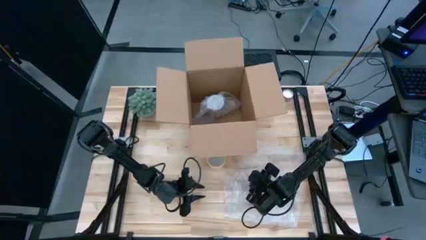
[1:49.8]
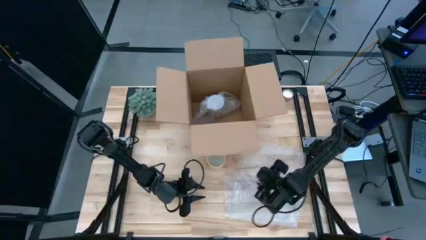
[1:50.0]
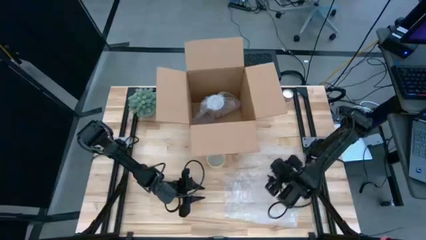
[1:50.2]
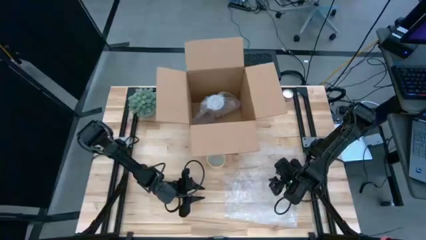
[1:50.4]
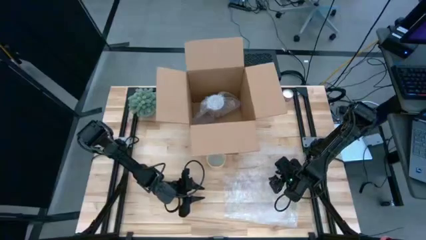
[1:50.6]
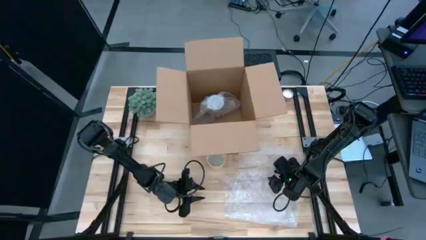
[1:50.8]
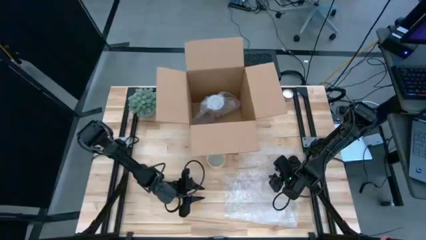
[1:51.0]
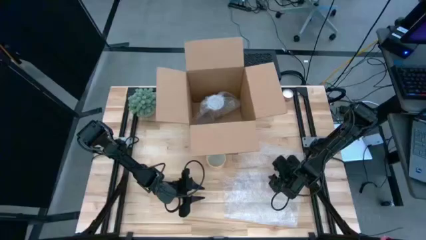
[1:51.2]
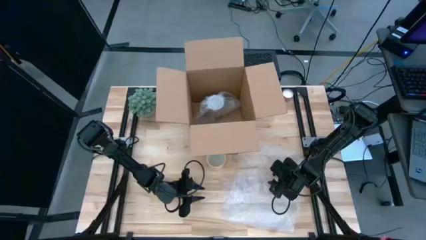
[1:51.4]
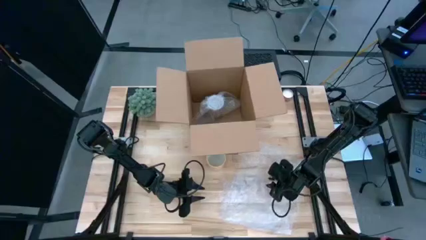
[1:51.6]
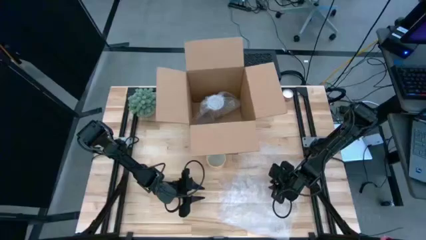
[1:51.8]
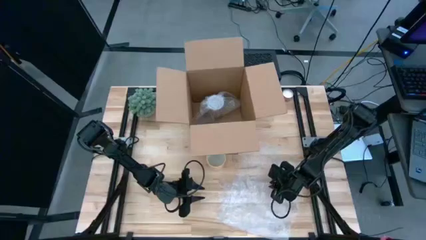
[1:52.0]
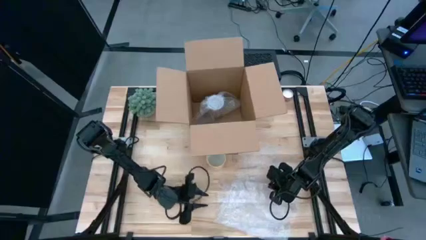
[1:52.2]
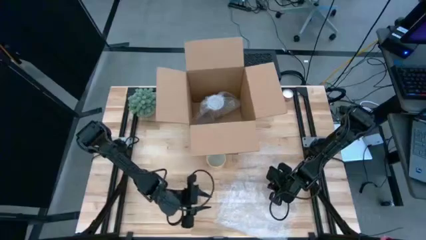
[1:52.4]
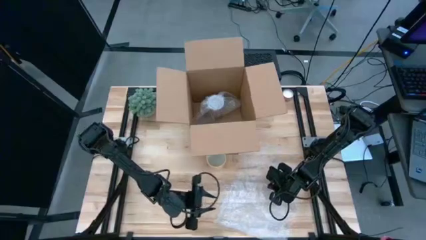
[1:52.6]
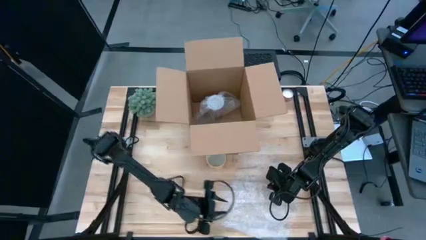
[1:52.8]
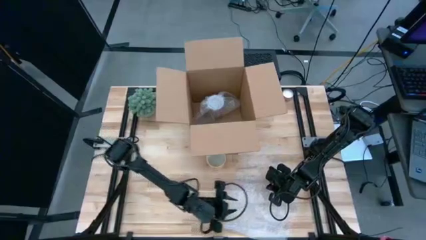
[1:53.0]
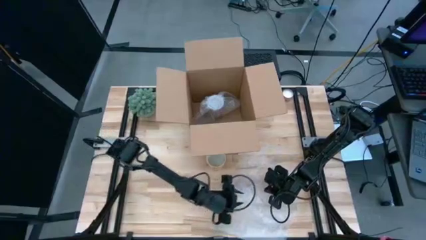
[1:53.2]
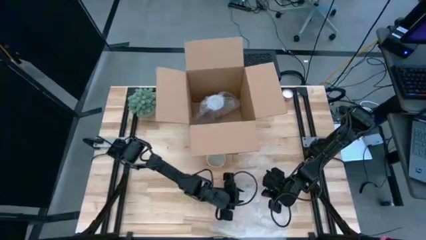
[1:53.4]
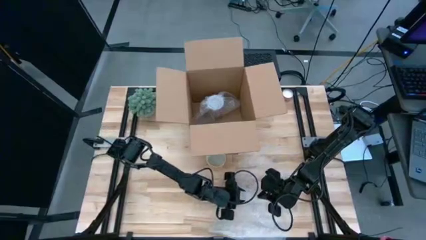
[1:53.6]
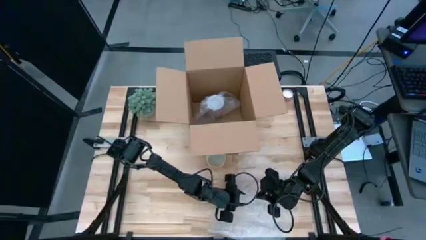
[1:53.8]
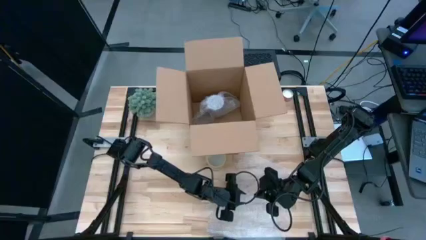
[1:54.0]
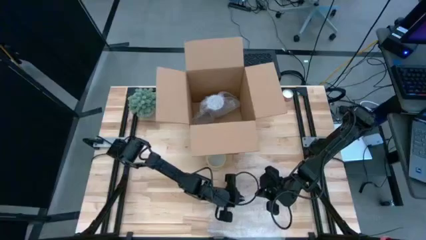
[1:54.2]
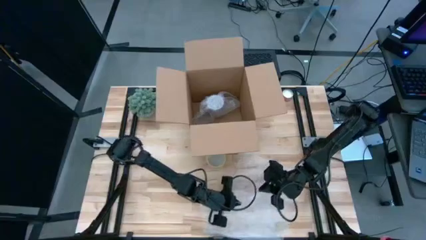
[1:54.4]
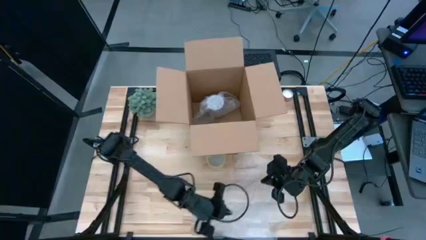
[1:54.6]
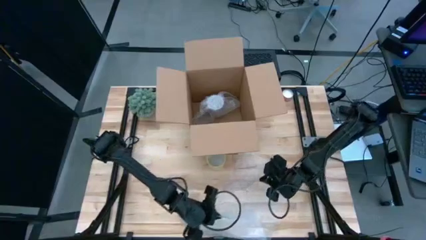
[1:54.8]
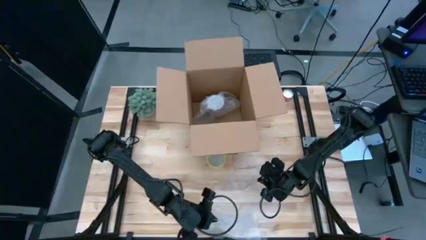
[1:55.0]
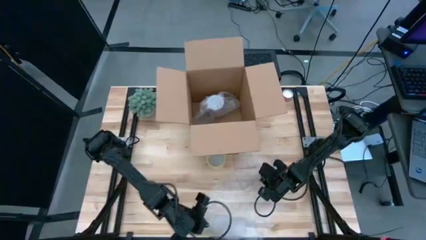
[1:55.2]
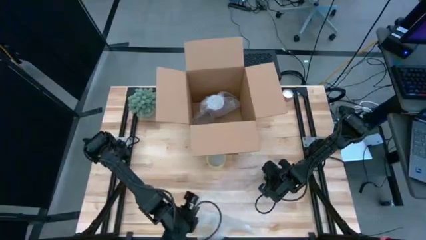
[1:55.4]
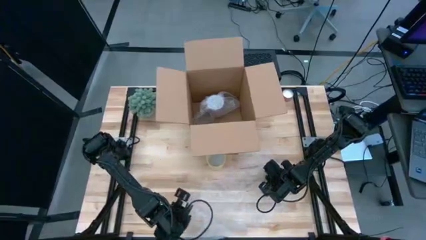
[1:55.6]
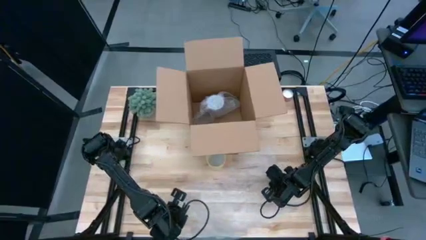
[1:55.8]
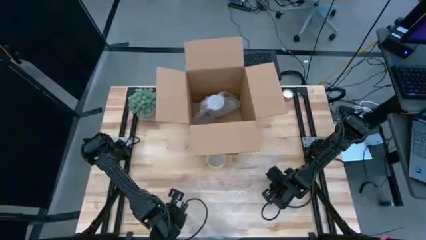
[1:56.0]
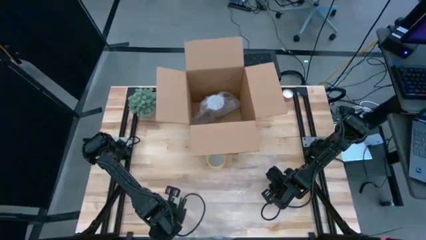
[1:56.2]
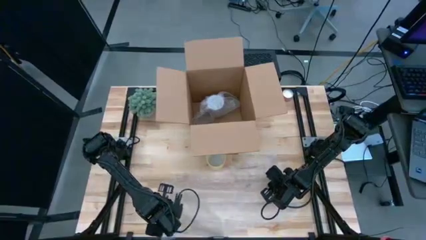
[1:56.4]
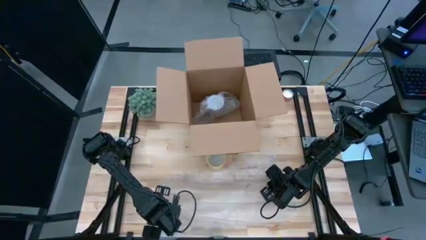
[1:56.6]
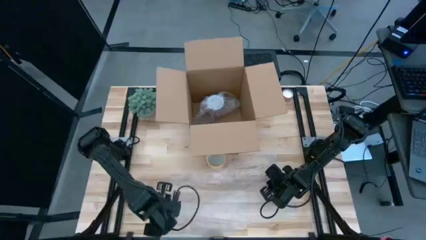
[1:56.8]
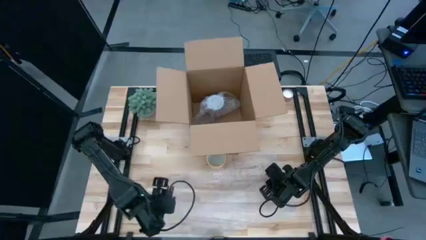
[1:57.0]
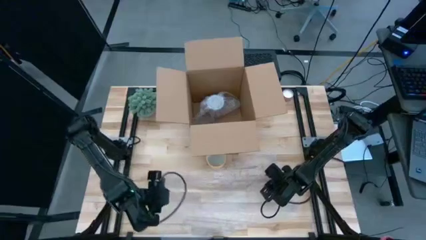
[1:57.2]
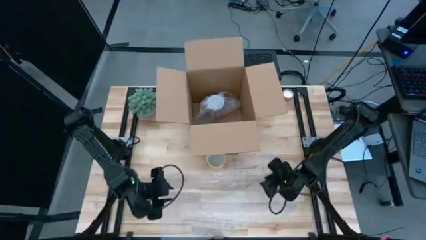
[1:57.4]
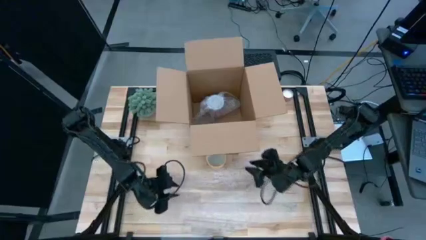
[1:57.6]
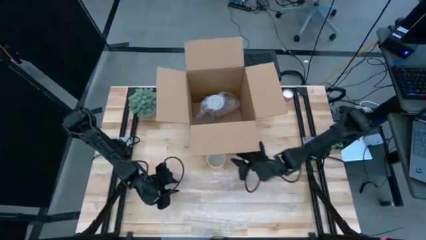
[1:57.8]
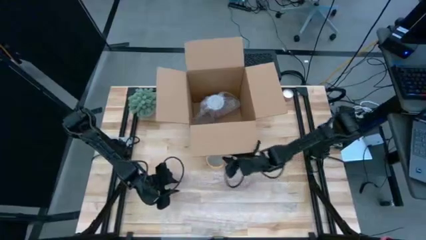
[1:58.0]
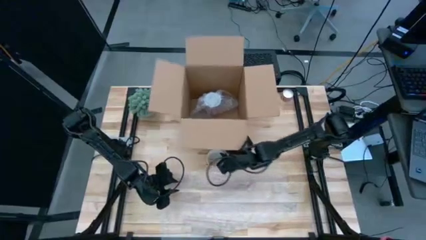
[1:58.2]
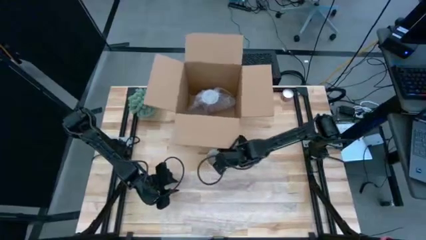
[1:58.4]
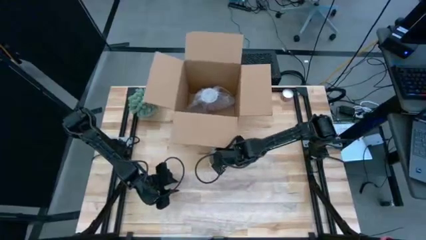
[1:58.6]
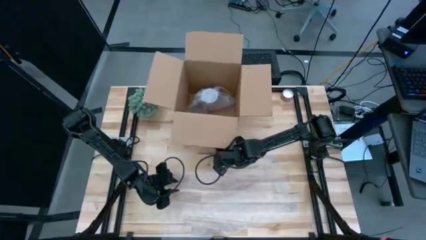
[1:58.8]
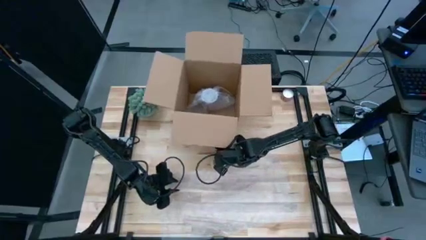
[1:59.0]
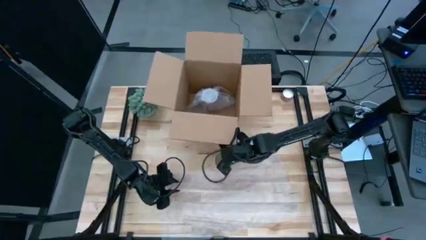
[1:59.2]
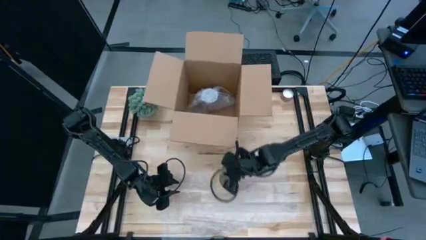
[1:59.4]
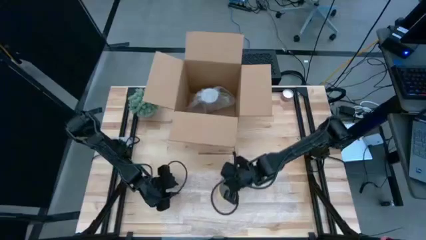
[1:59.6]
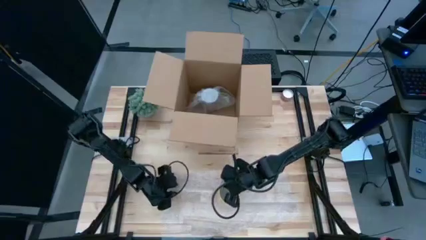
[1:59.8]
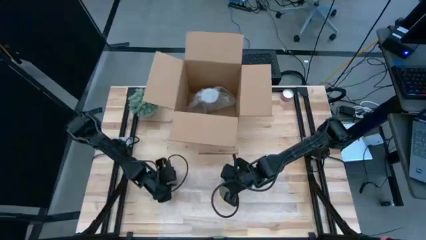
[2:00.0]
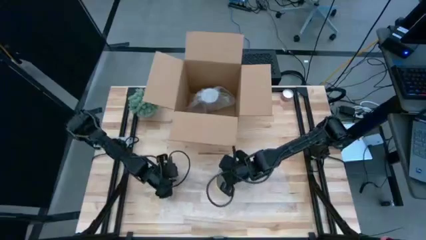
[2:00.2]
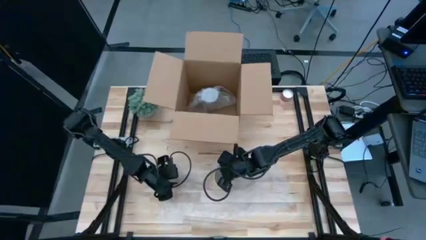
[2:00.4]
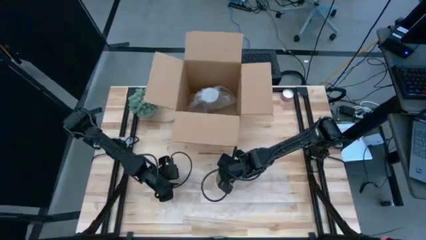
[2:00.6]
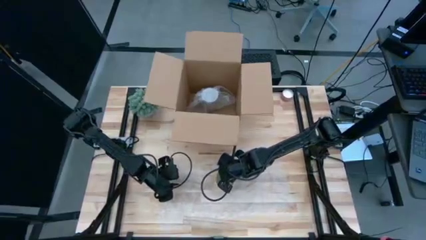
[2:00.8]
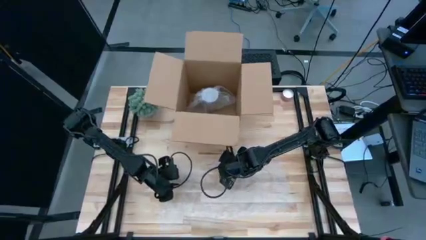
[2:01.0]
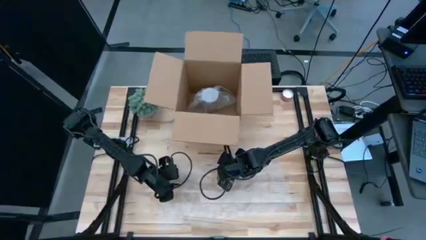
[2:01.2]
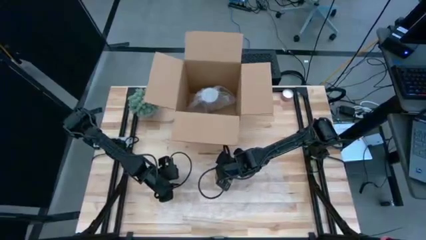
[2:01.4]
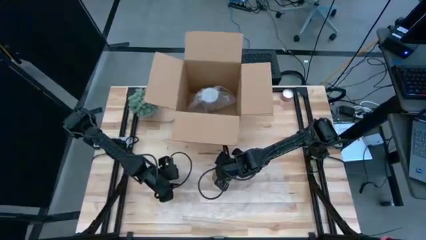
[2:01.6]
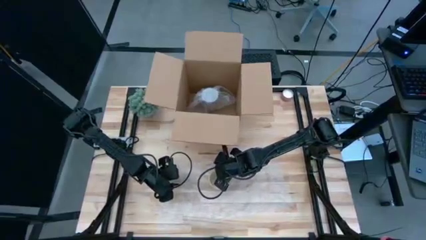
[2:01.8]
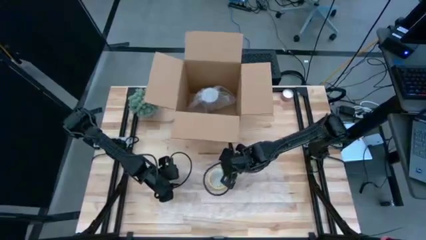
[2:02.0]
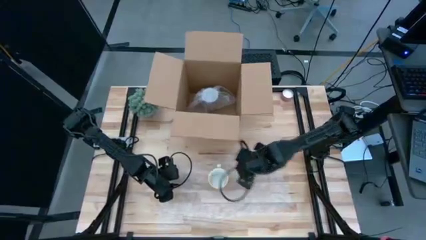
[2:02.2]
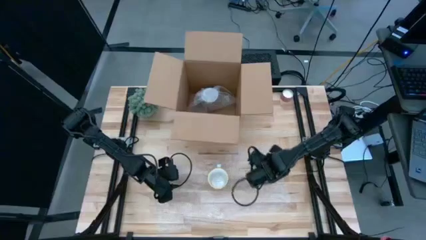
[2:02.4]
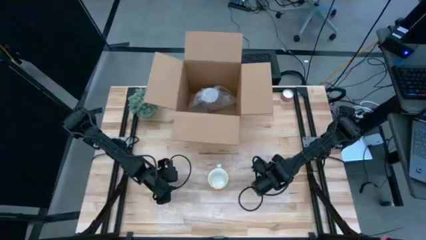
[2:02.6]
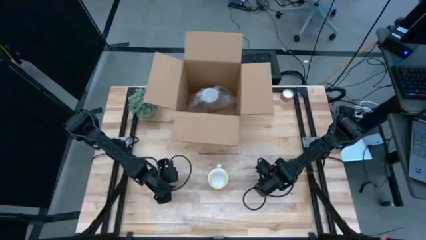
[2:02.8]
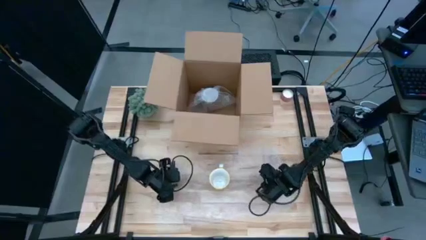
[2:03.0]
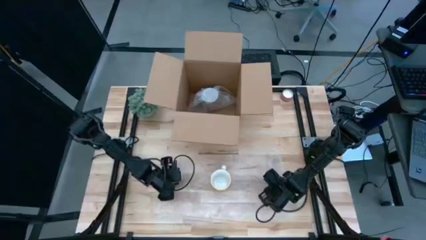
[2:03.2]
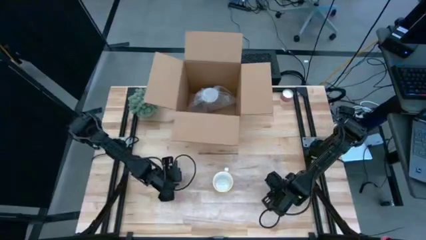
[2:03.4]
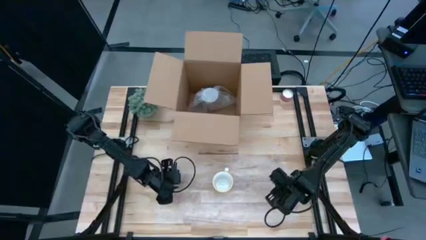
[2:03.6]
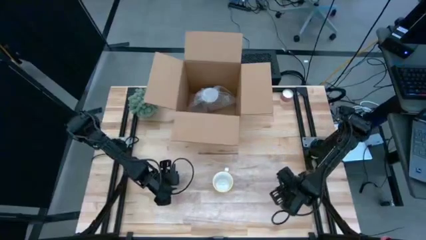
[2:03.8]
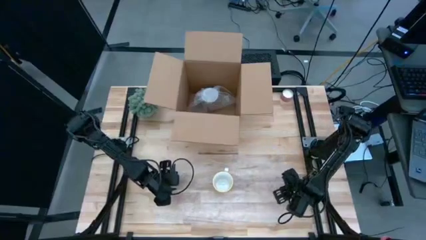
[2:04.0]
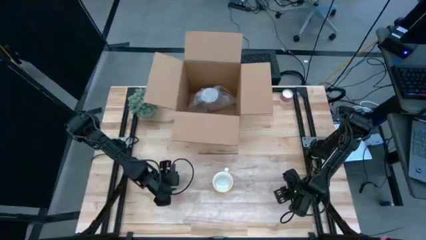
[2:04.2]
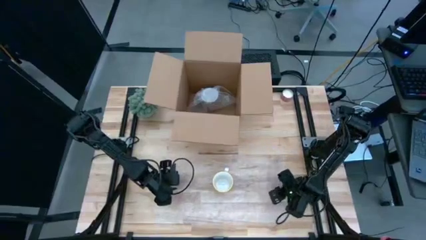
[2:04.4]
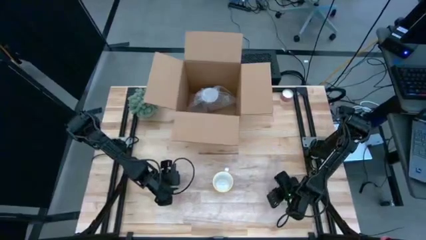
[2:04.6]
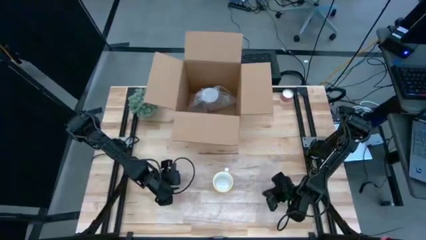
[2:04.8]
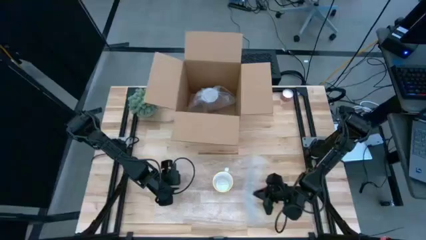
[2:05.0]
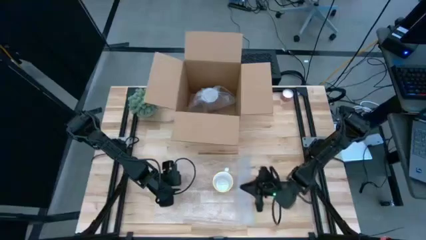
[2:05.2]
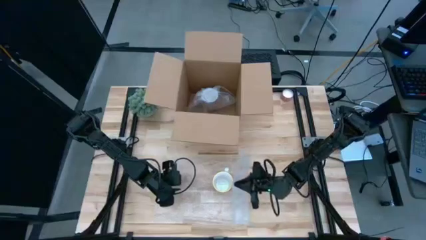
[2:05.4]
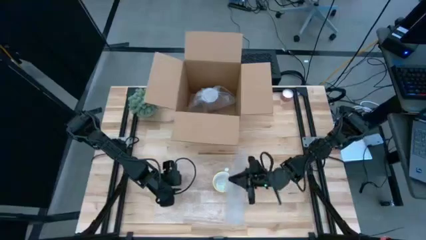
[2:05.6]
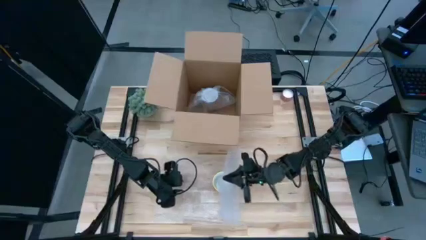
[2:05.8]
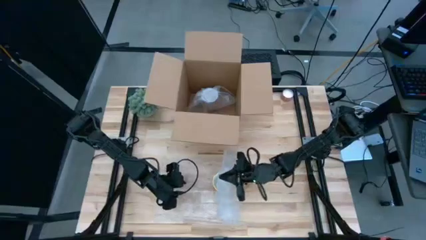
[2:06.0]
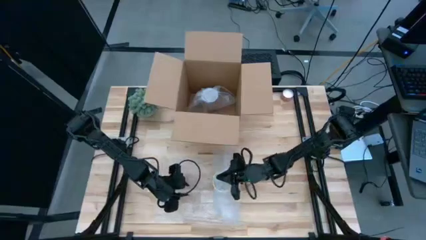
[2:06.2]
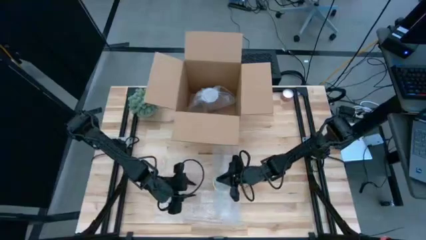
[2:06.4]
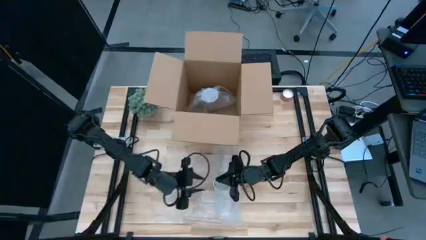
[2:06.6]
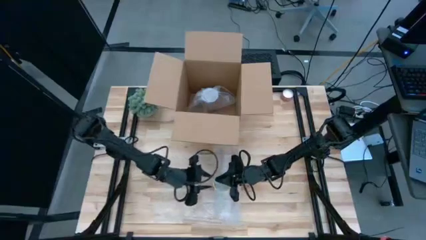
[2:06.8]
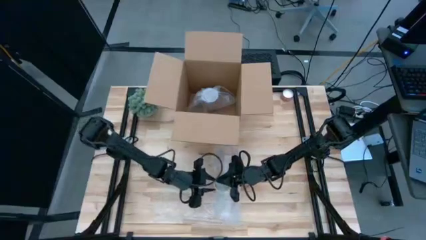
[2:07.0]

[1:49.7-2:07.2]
Task: wrap mug
Wrap the yellow patterned mug with bubble wrap
